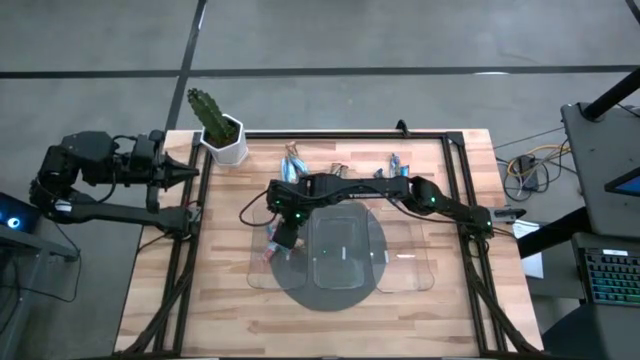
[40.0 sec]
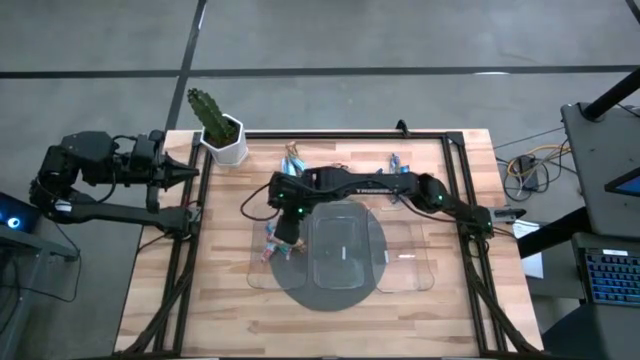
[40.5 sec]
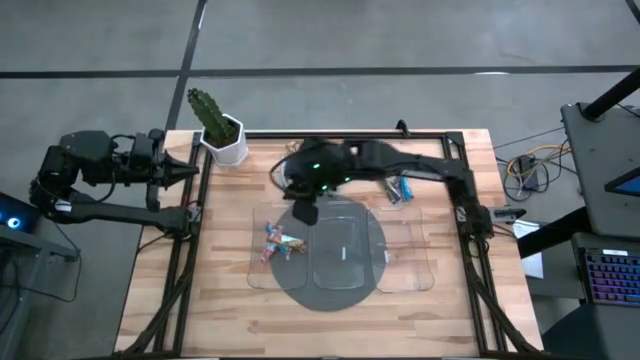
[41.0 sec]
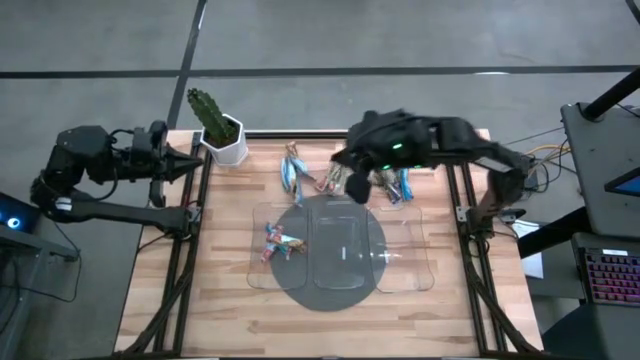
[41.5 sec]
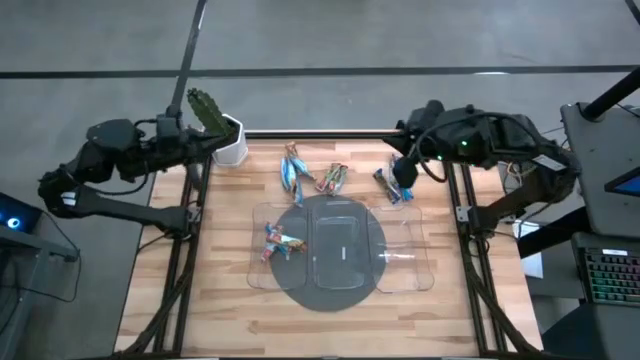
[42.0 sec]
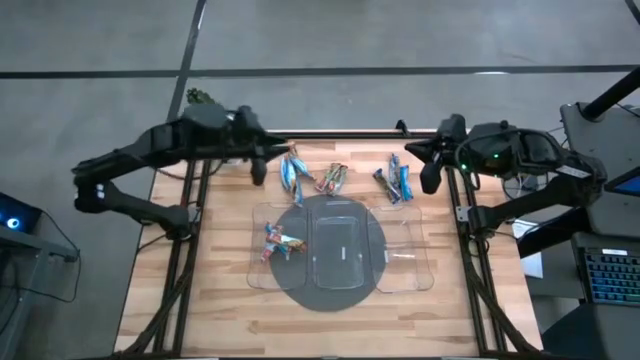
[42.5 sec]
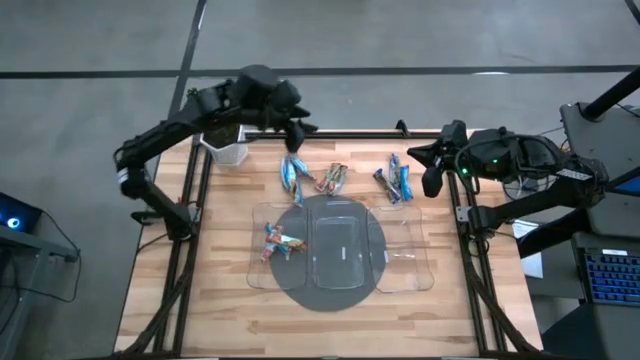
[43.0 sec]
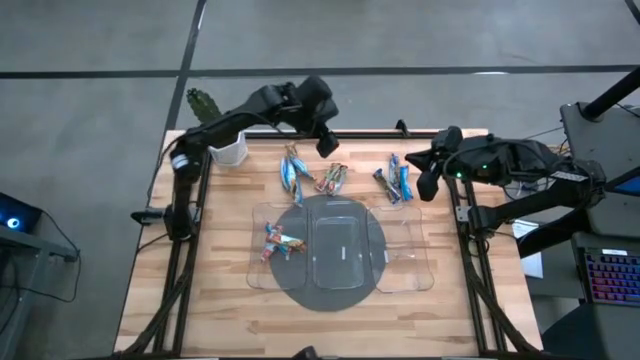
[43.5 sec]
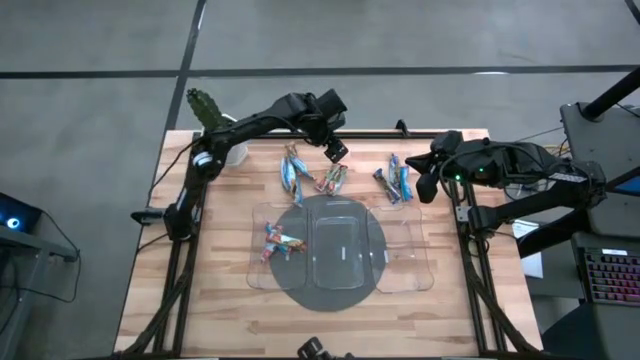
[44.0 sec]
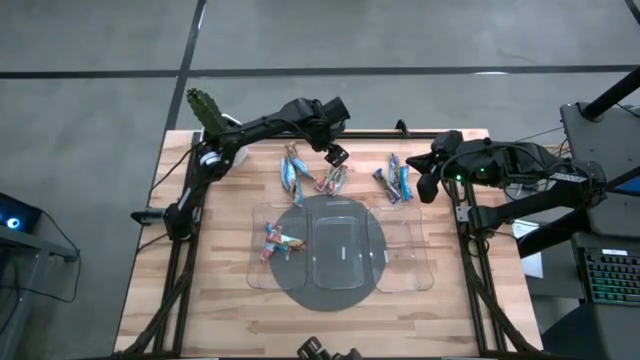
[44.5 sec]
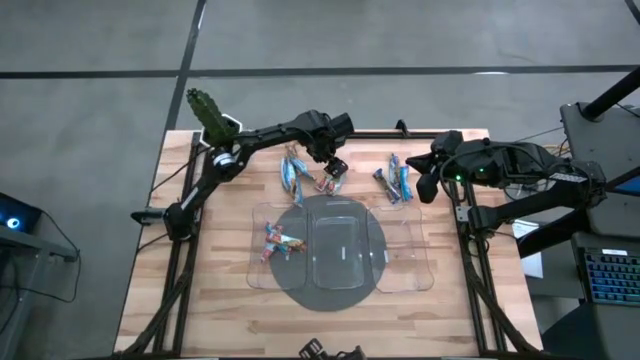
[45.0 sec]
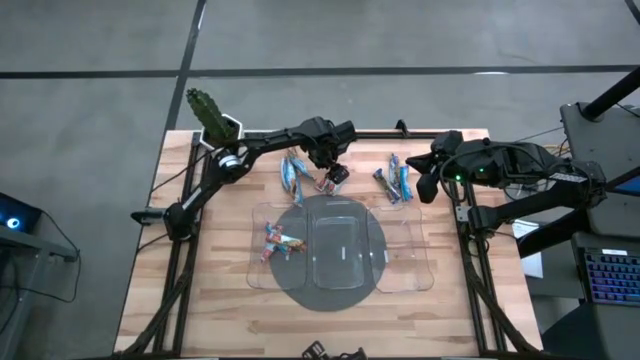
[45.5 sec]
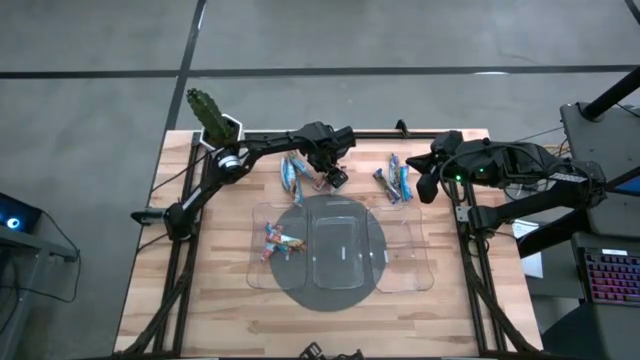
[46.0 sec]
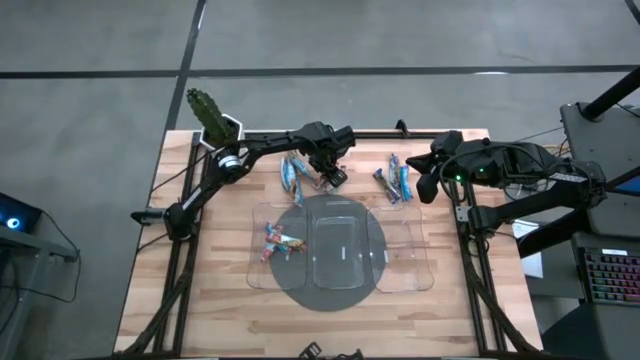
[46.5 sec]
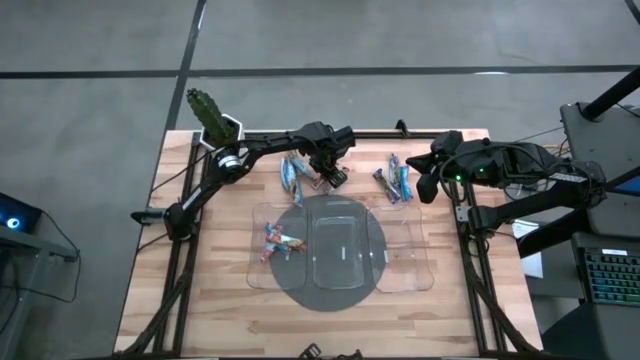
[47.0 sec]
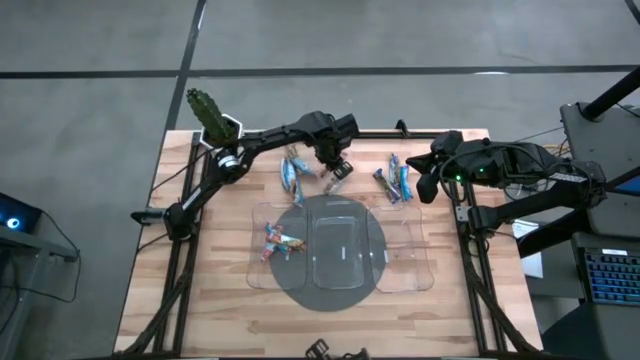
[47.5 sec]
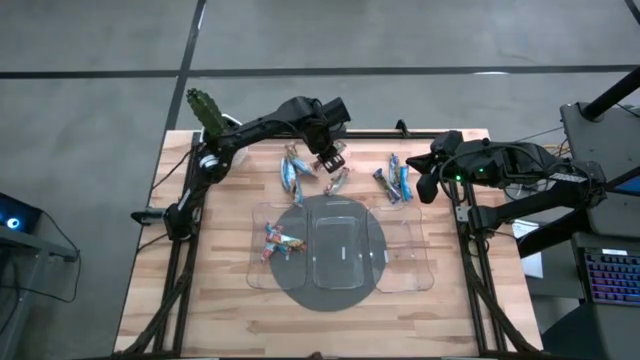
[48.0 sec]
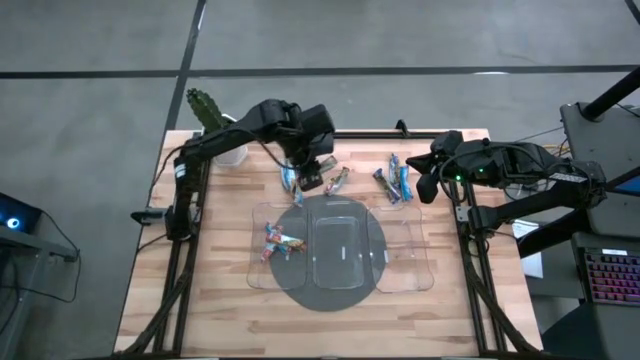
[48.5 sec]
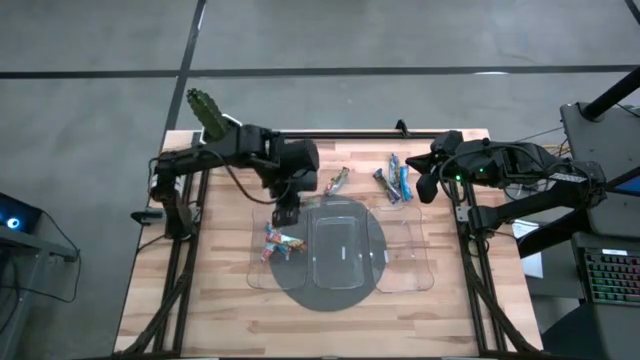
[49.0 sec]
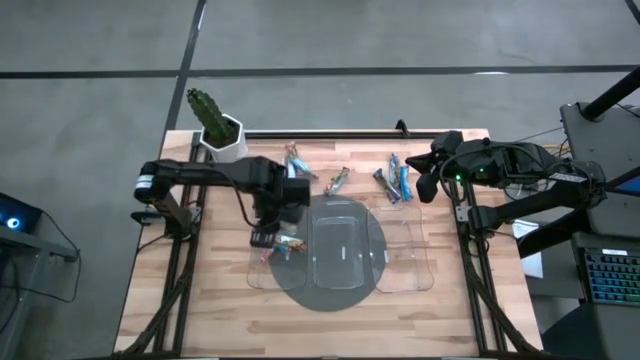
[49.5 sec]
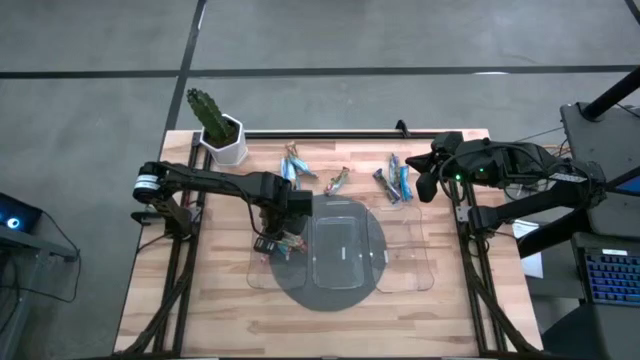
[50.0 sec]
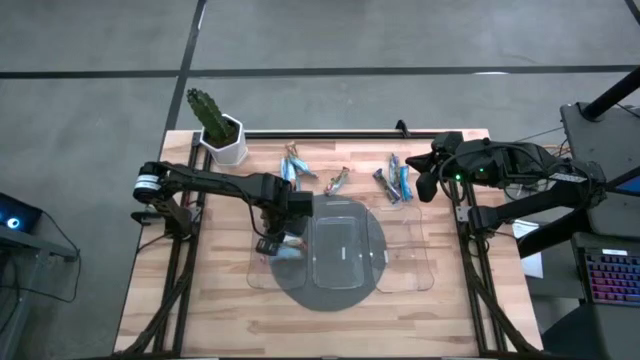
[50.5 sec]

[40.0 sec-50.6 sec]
Task: Pick and place Granola Bars by type
Put the red granola bar into the left transparent bin

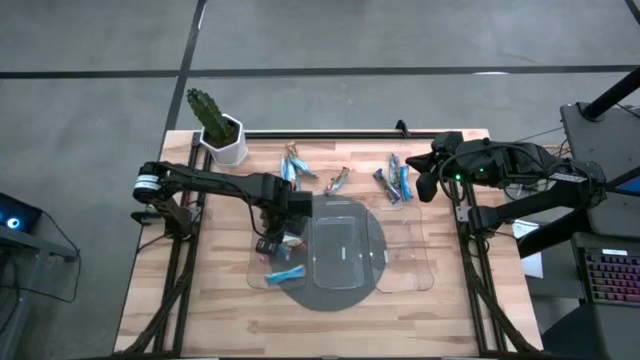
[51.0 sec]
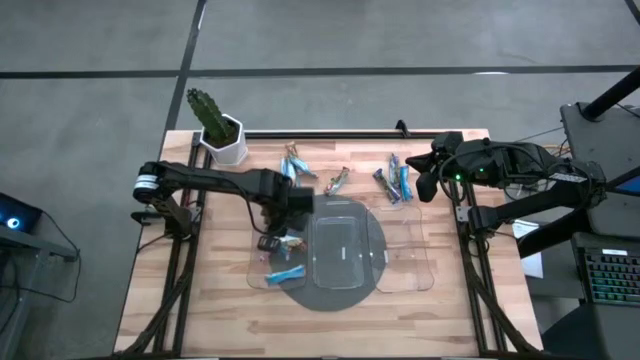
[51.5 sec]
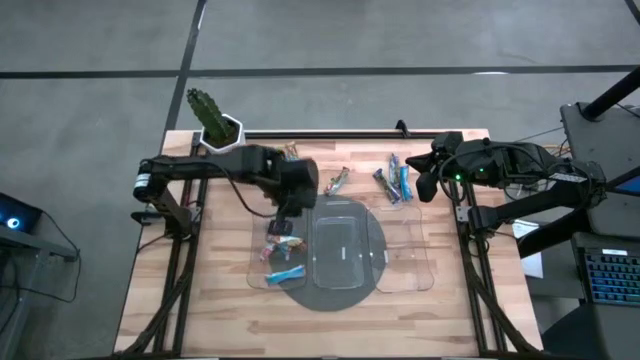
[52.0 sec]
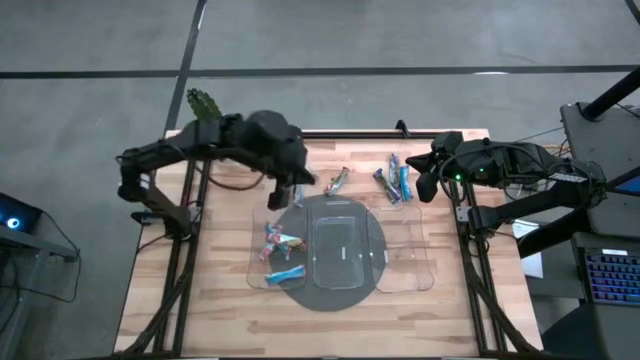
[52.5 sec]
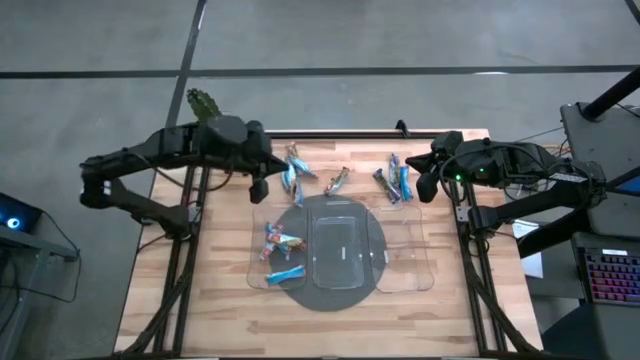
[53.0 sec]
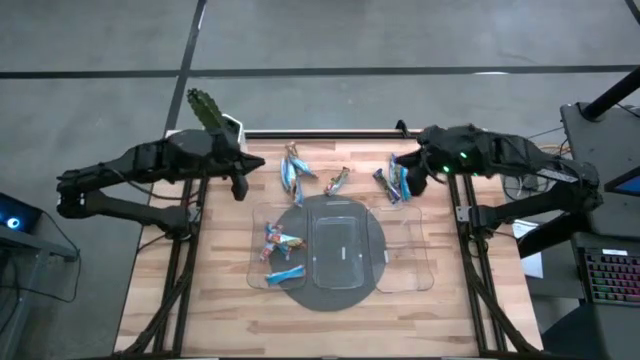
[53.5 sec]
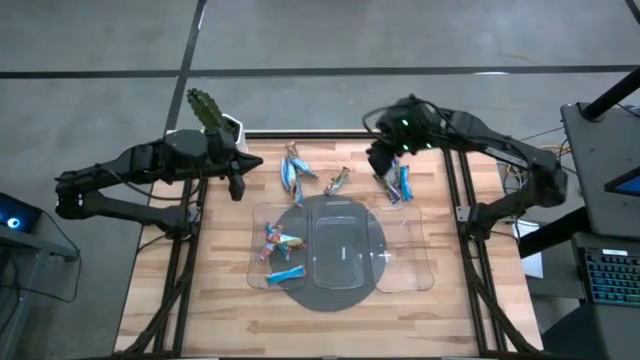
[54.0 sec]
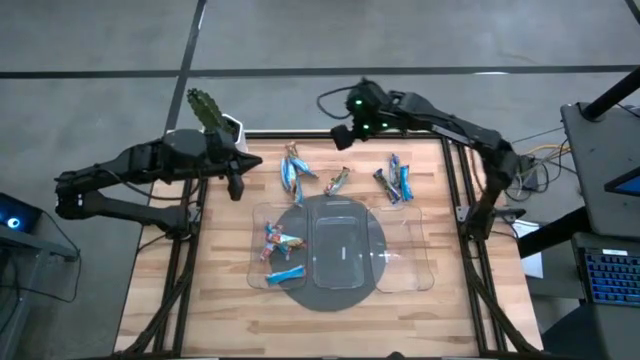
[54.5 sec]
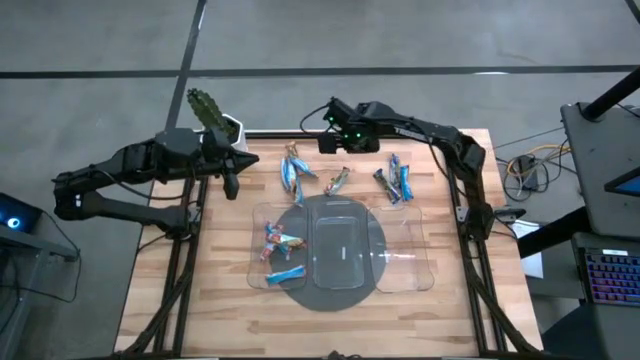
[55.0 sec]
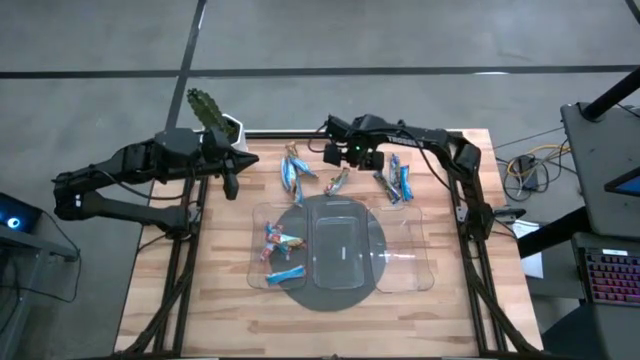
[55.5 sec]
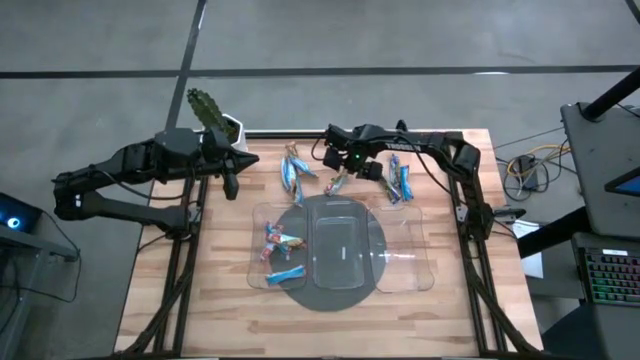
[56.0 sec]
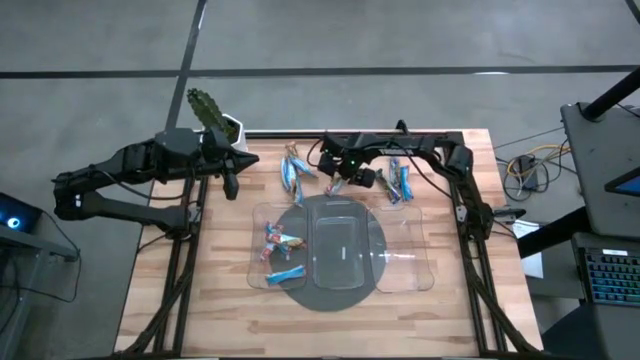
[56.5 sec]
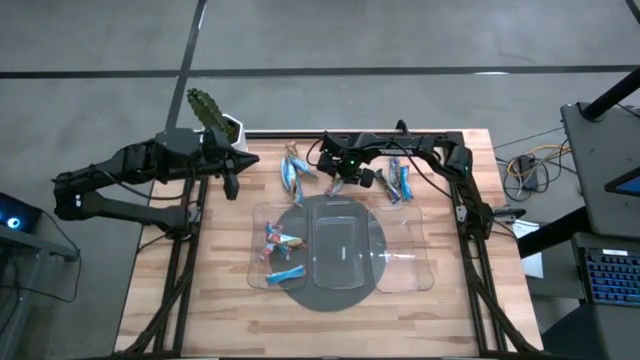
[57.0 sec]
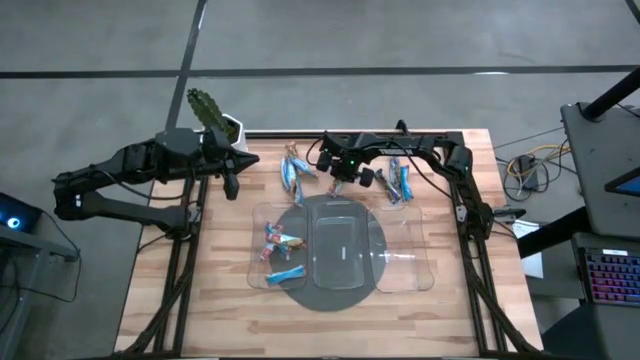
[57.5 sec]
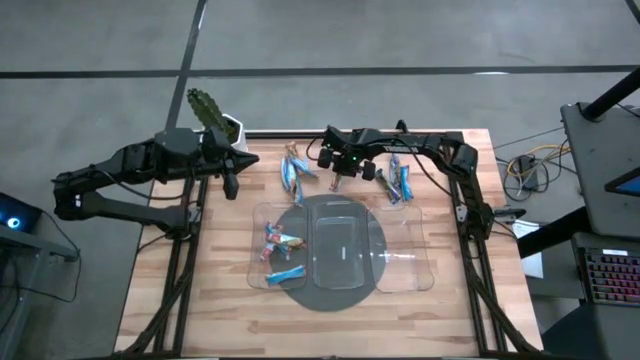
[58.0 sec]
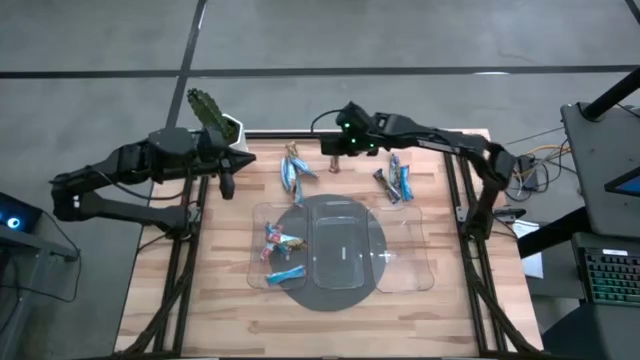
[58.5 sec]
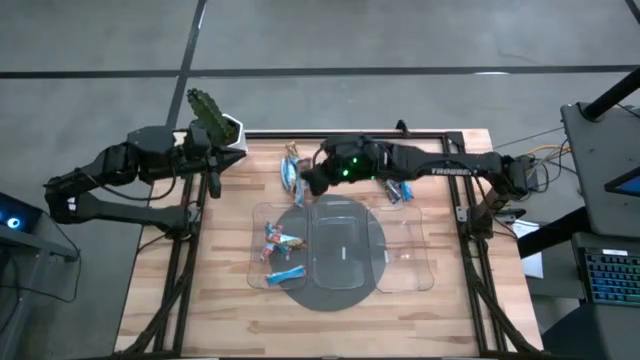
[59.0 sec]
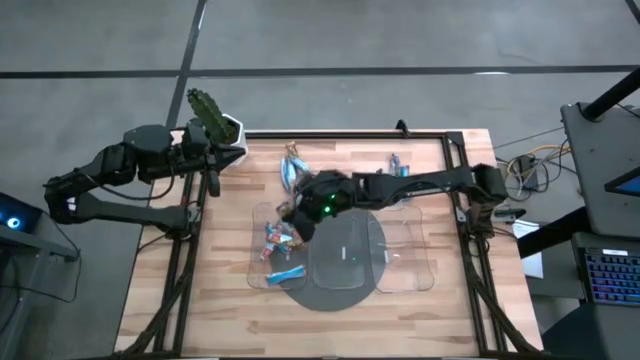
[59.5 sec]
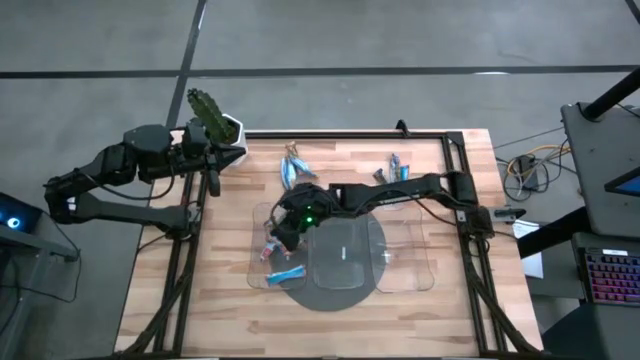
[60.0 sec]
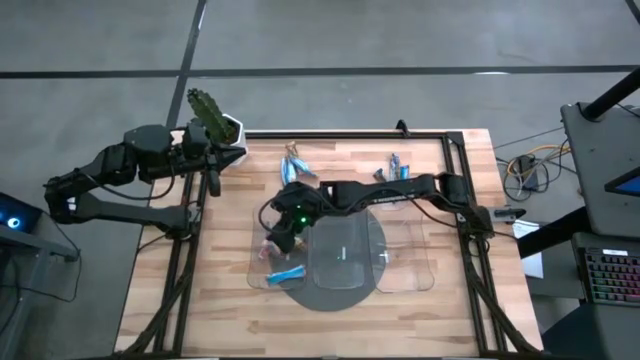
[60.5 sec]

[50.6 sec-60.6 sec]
Put the red granola bar into the left transparent bin

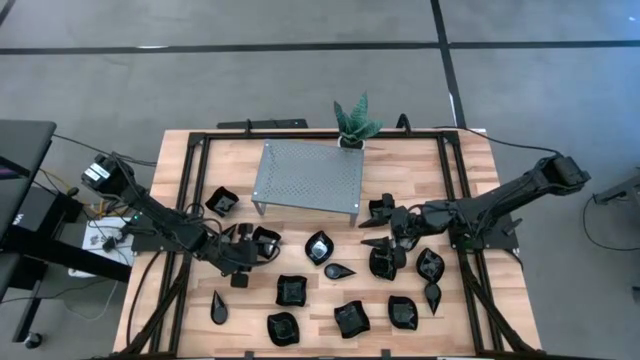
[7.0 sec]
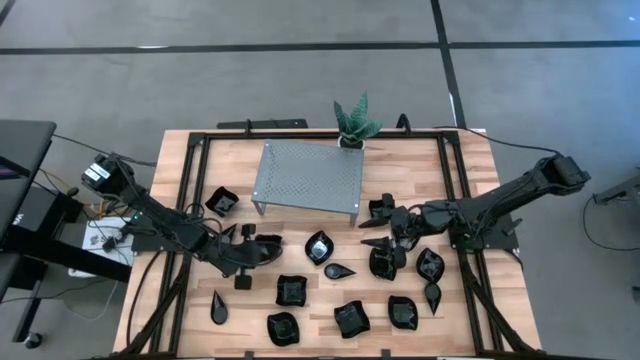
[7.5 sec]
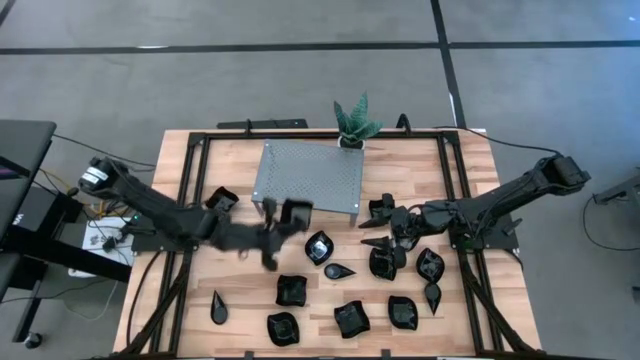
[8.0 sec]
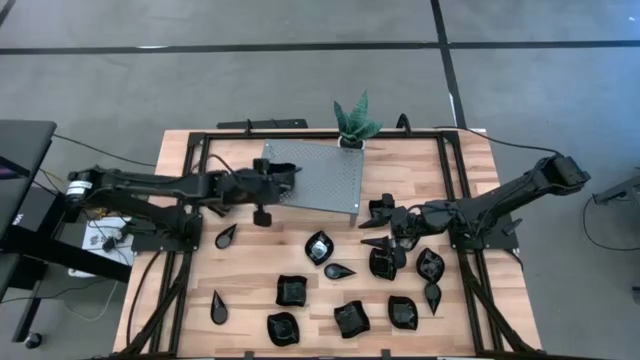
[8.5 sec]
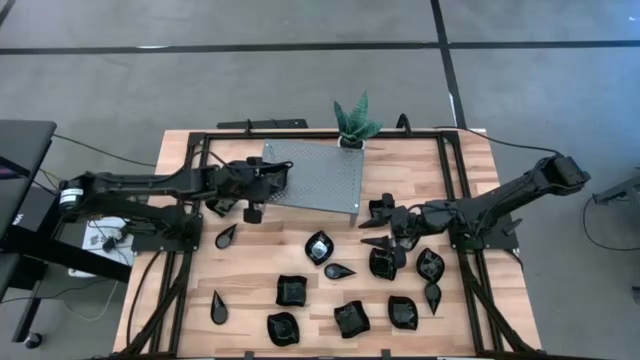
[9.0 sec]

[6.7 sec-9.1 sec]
Task: Pick & Place Mini shaped plates
Put the black distorted square plate on the shelf
